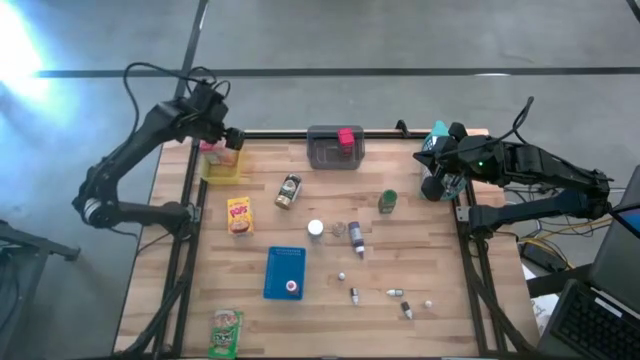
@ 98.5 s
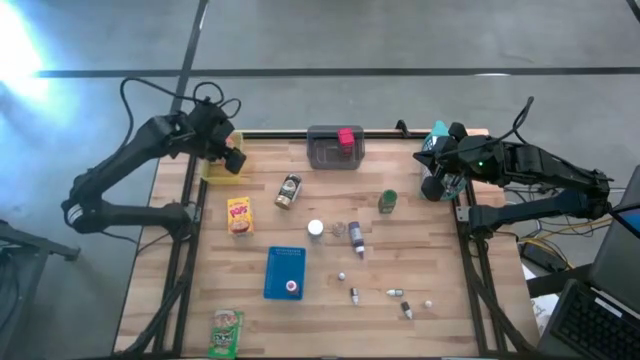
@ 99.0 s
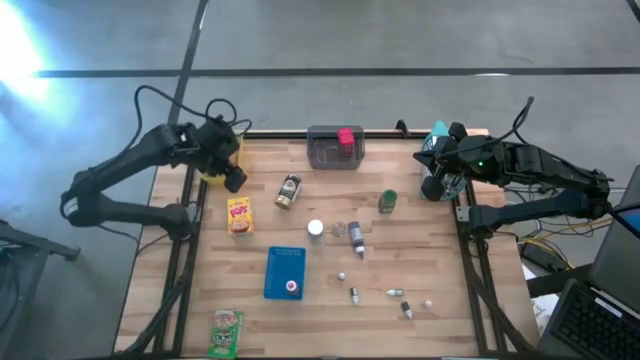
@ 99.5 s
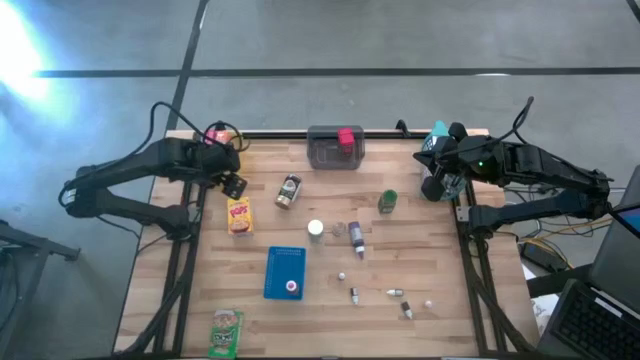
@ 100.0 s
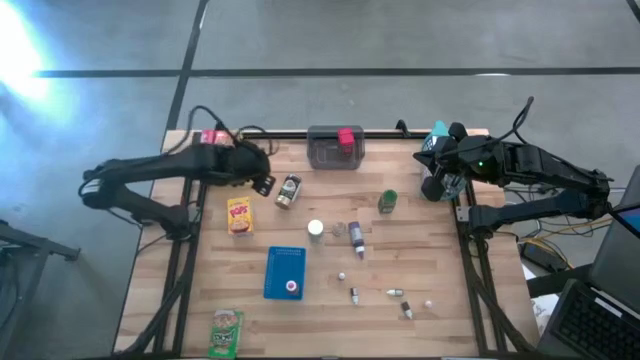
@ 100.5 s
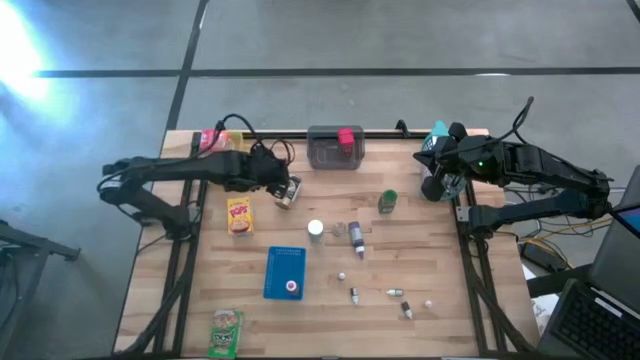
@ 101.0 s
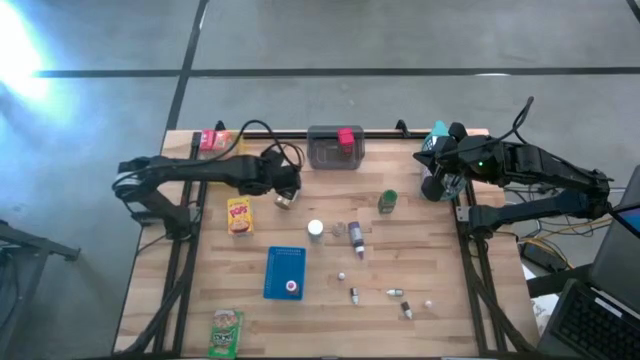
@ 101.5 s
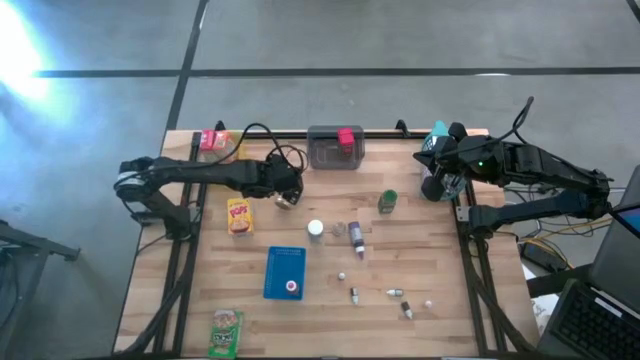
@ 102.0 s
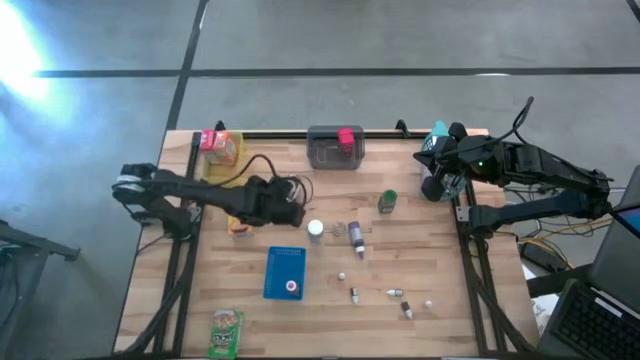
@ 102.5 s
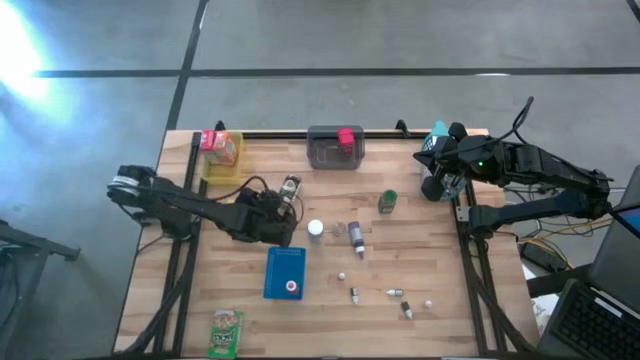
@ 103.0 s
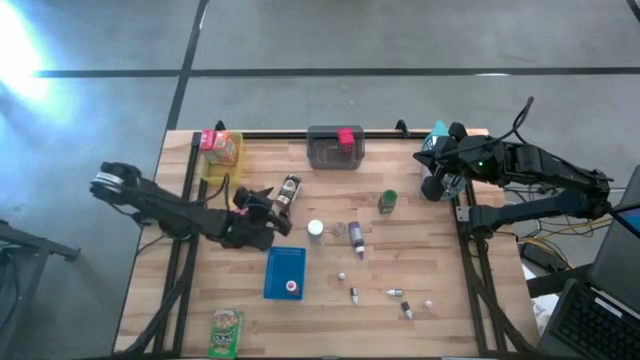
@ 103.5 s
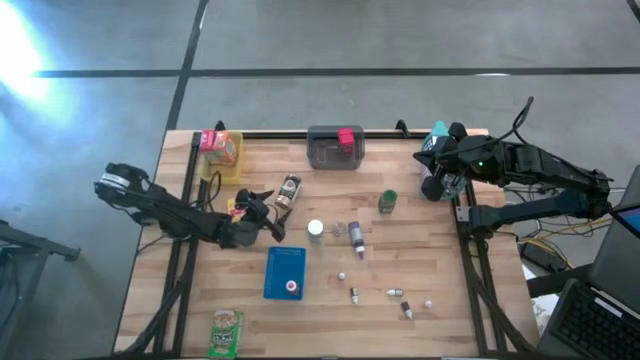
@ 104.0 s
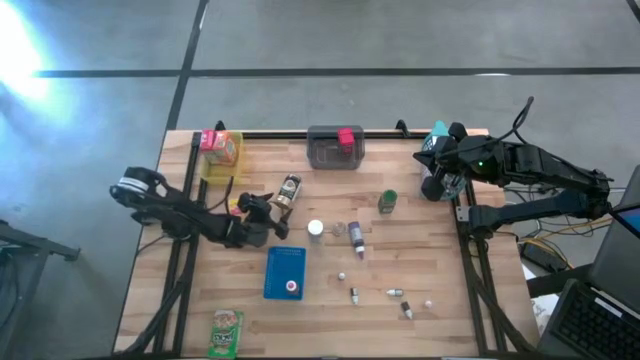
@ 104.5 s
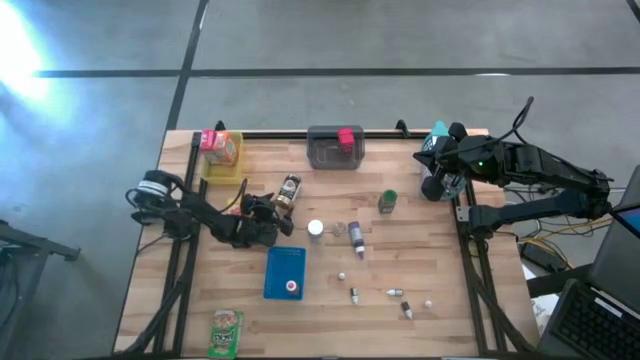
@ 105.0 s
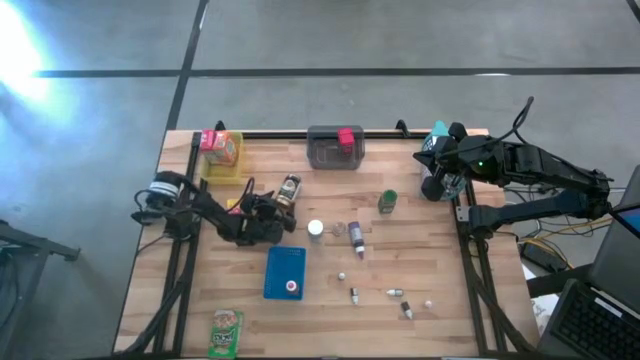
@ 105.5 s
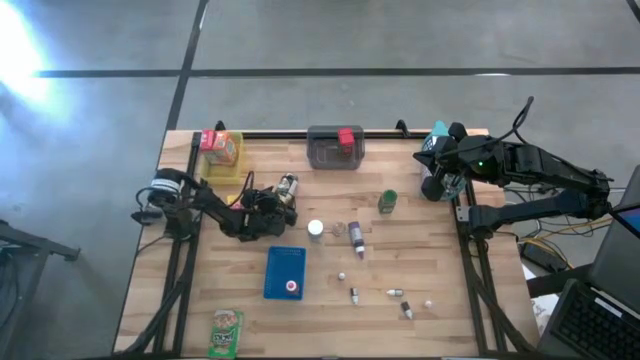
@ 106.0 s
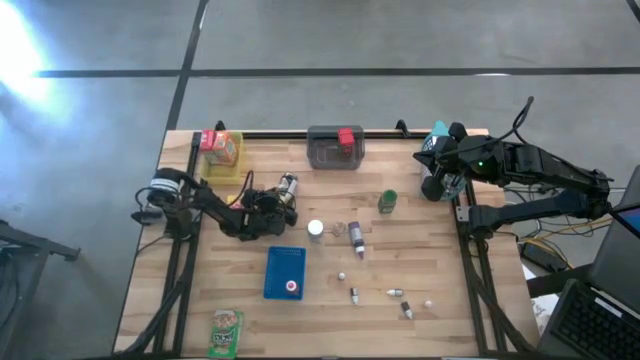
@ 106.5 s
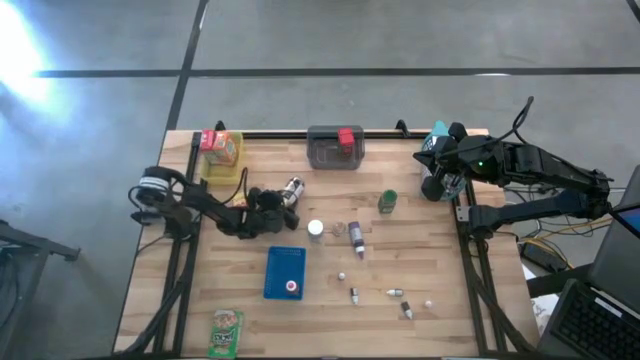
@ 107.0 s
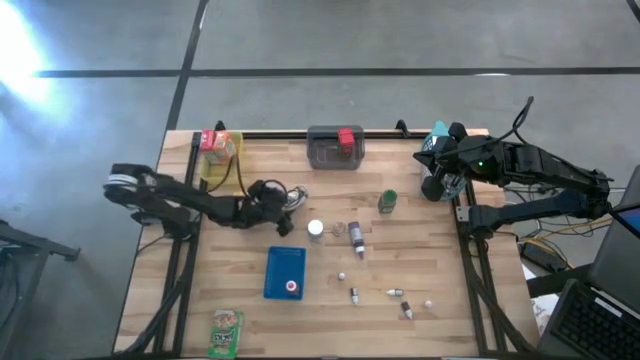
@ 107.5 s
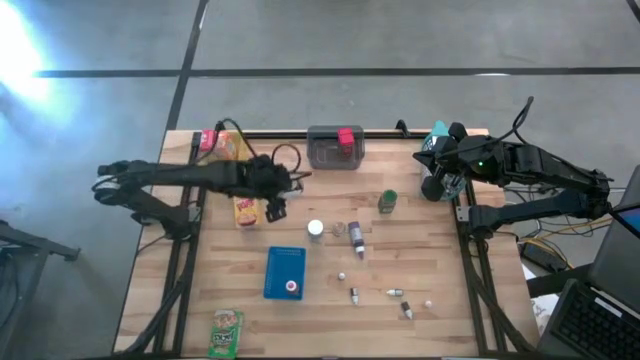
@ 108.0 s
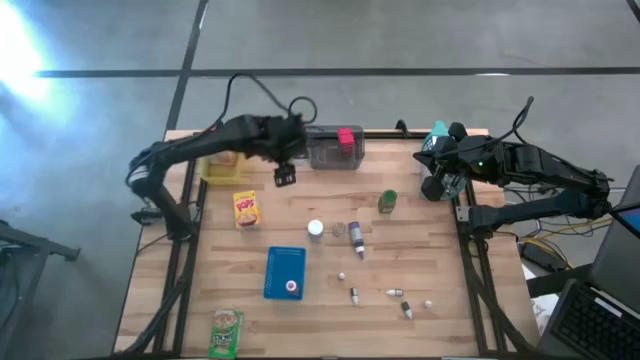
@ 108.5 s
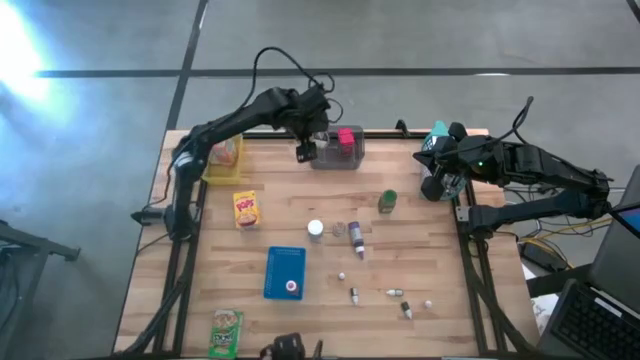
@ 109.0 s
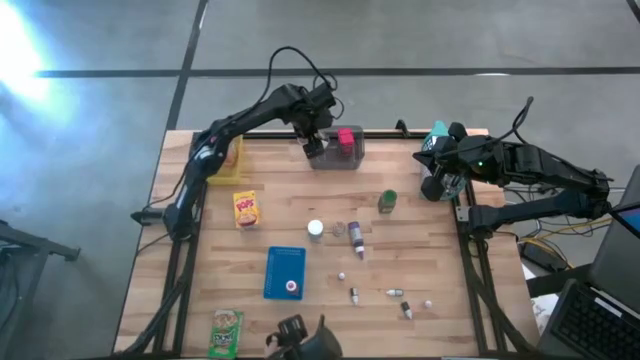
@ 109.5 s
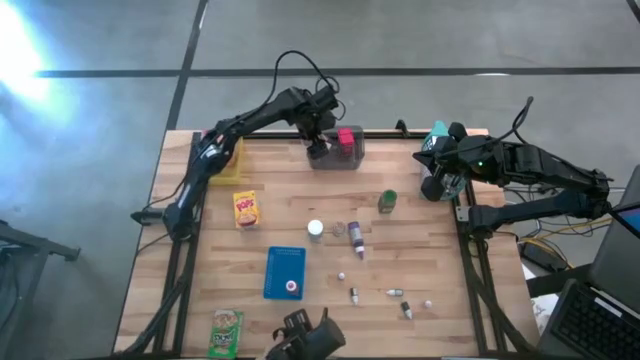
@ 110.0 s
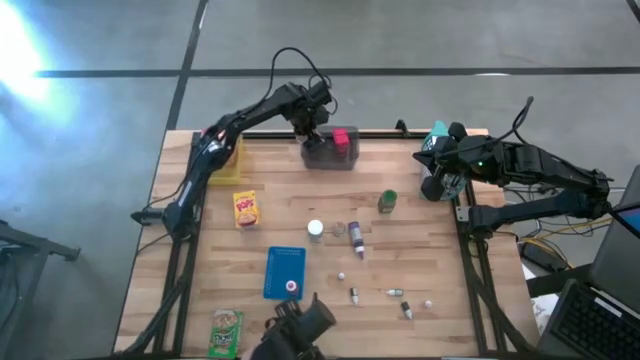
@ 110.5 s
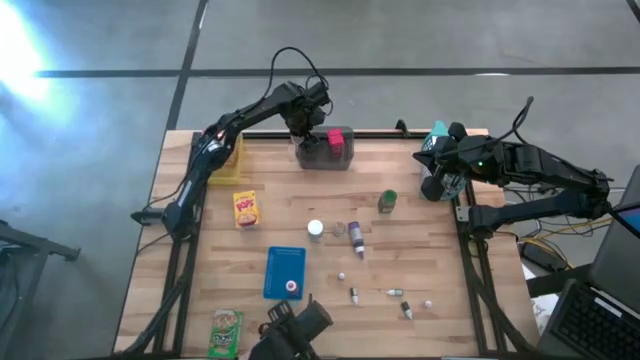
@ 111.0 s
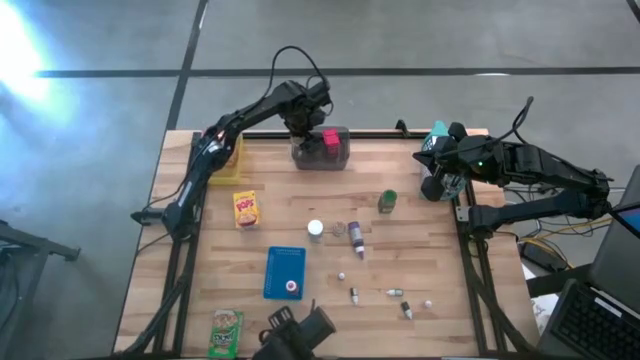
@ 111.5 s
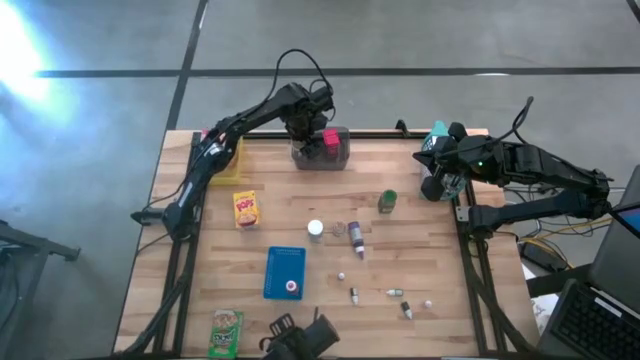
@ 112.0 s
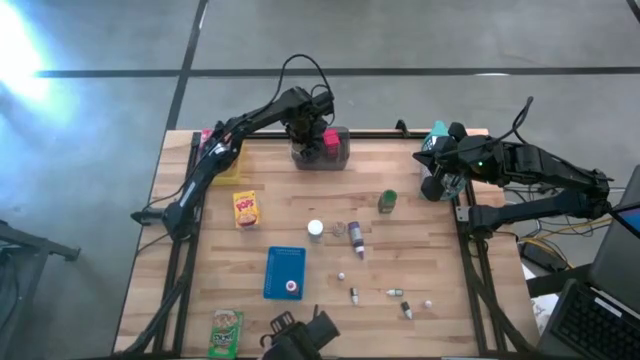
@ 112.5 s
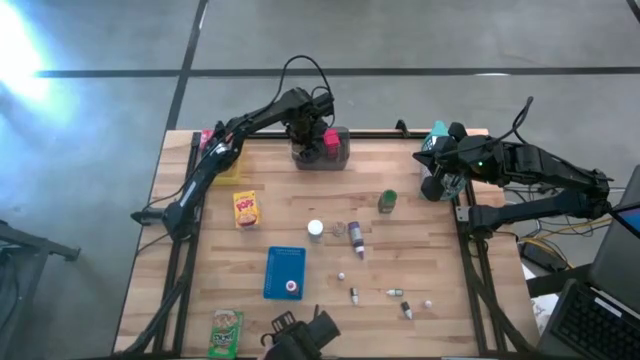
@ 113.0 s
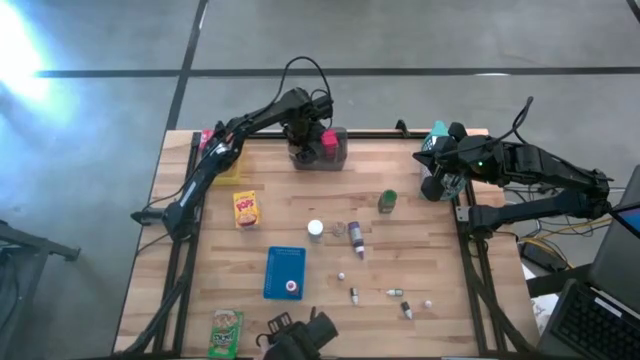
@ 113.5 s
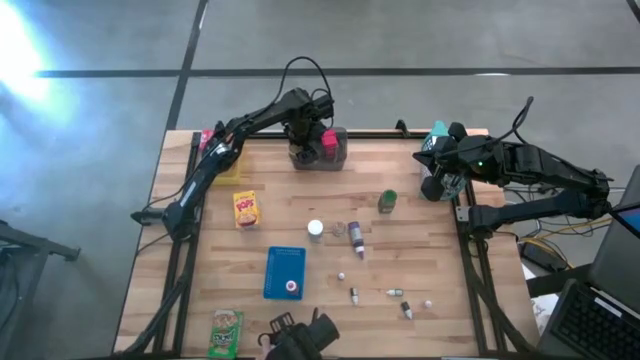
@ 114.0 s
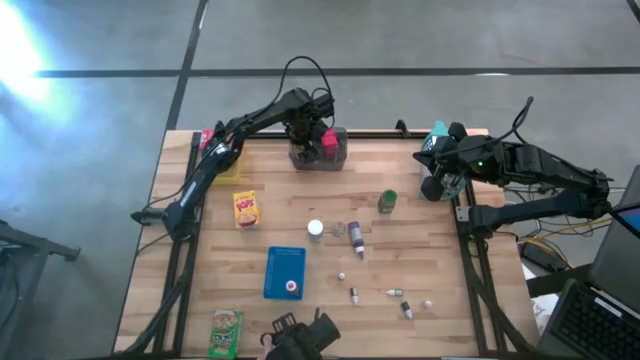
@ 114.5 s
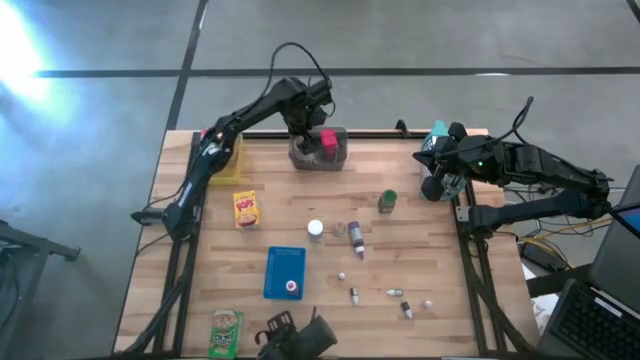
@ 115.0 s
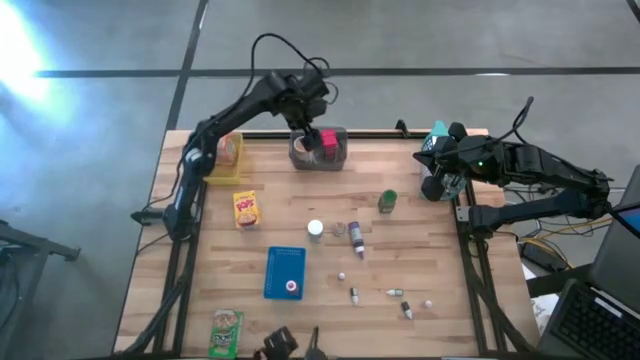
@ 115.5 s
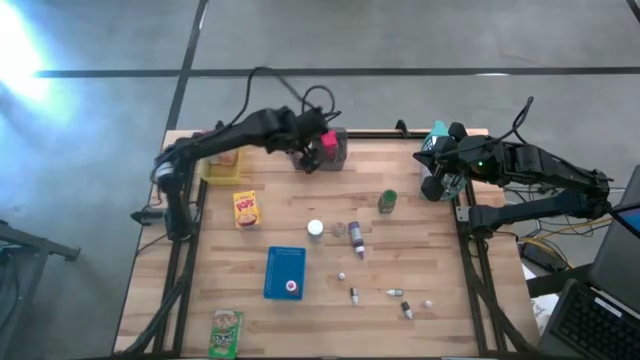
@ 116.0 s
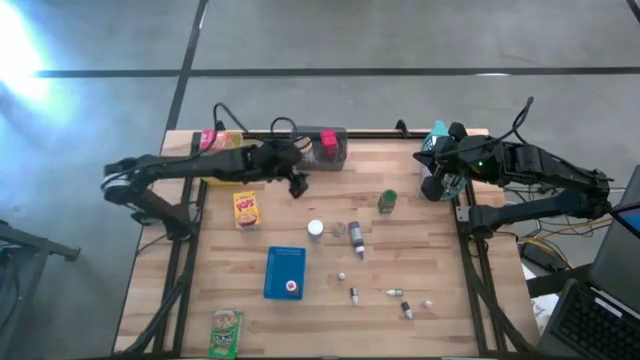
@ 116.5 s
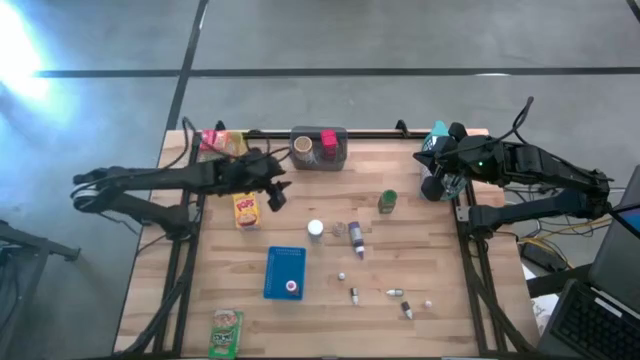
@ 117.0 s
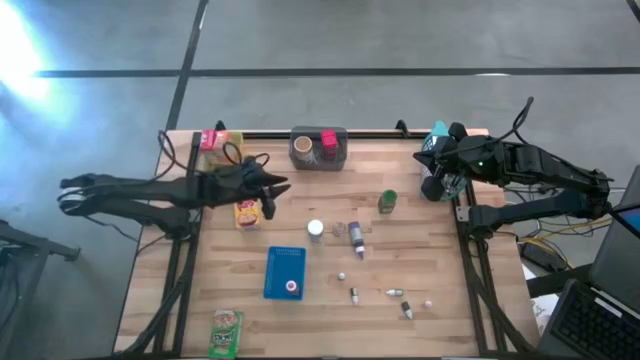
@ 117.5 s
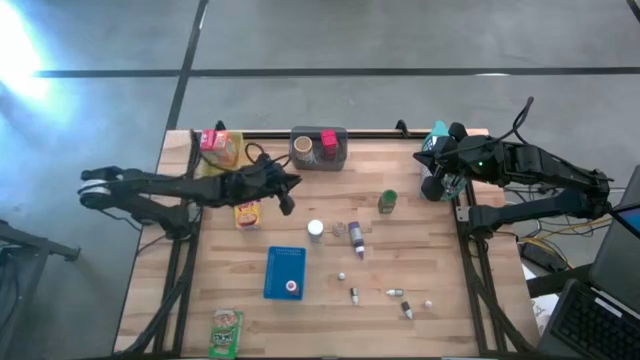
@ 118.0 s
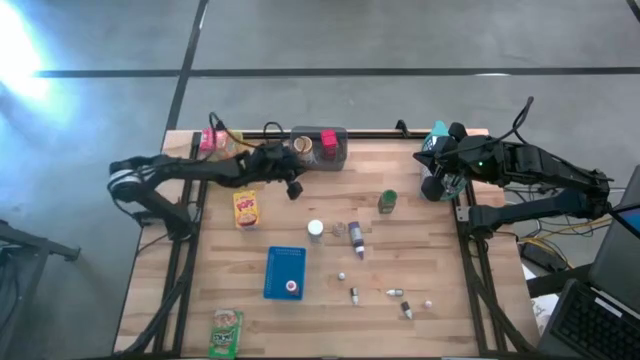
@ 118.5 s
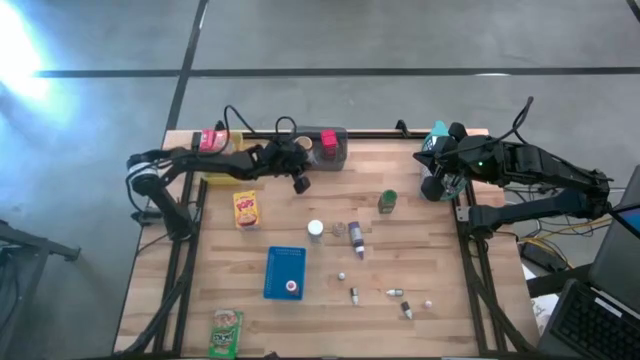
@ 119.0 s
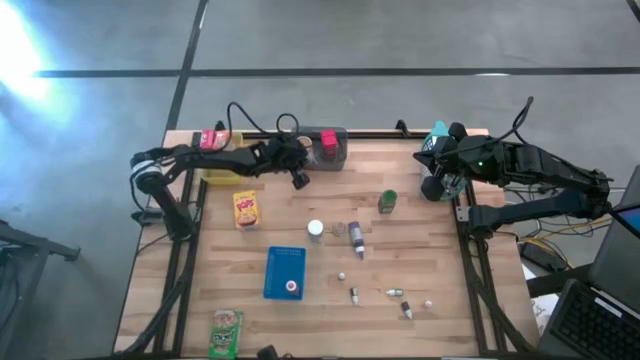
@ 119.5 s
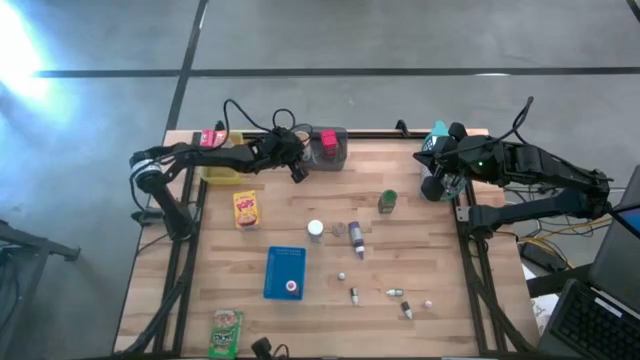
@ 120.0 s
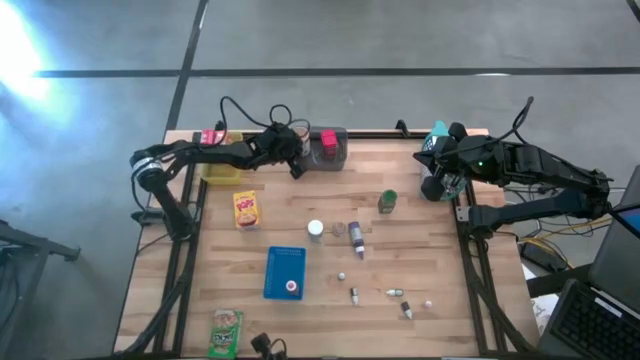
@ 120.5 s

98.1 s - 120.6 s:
Task: Pick & Place Kitchen Items
Put the gold spice bottle into the black bin
